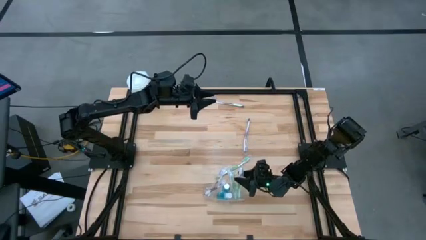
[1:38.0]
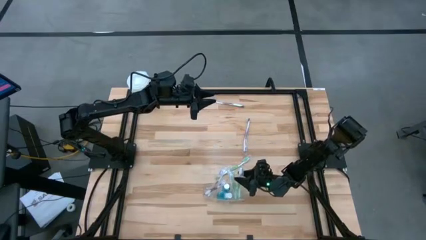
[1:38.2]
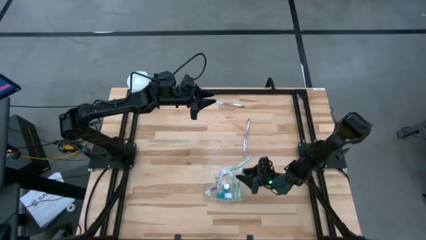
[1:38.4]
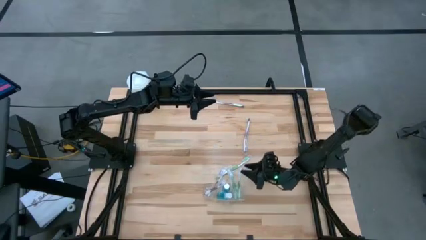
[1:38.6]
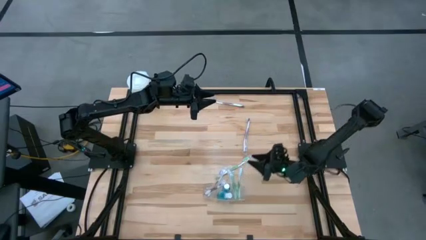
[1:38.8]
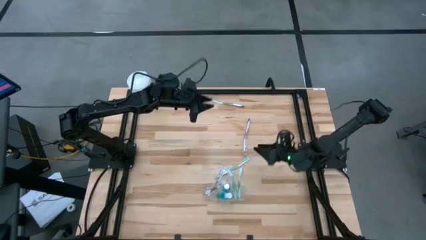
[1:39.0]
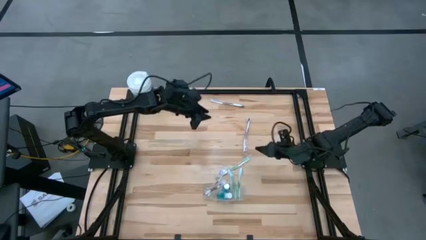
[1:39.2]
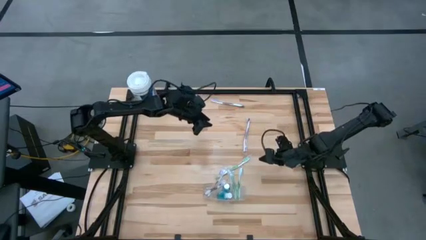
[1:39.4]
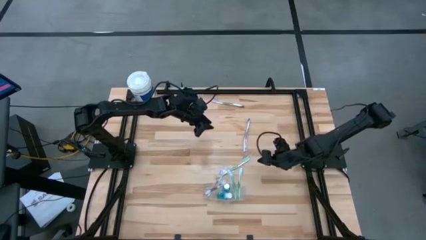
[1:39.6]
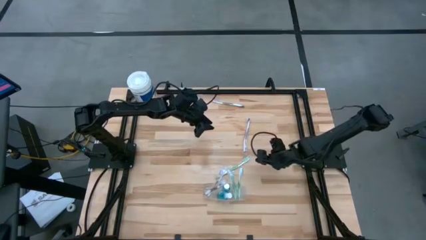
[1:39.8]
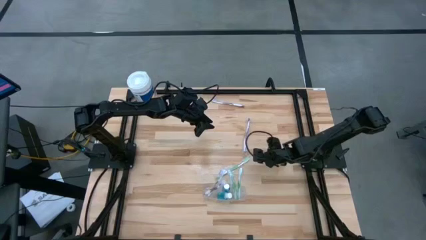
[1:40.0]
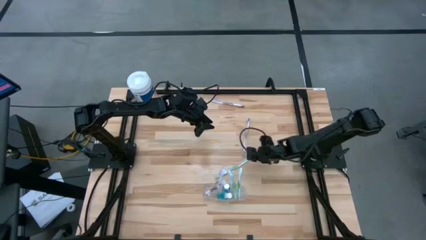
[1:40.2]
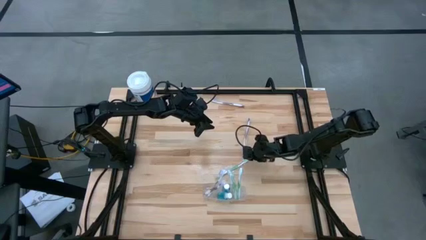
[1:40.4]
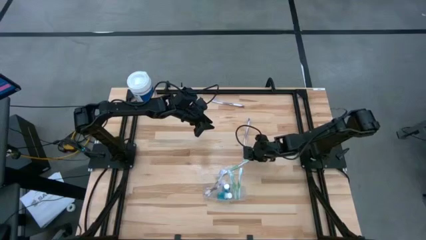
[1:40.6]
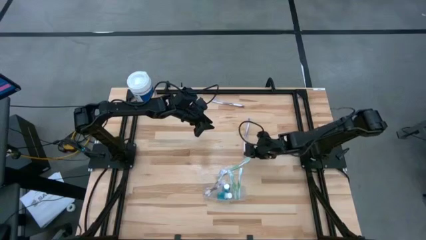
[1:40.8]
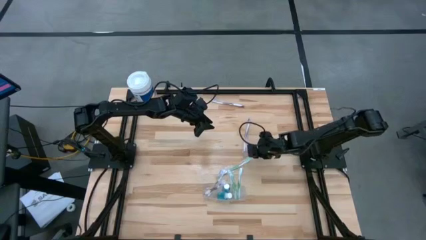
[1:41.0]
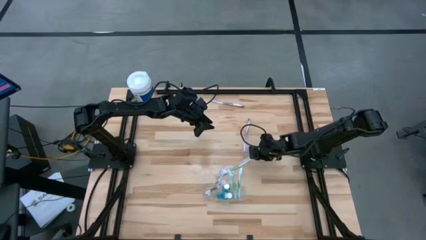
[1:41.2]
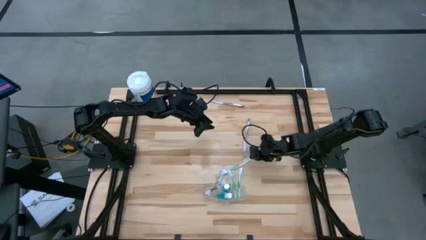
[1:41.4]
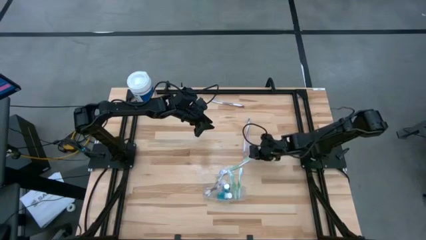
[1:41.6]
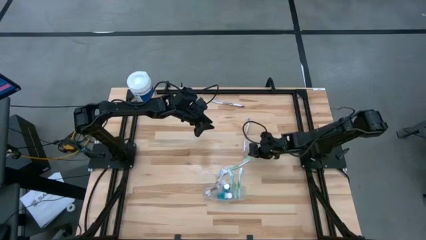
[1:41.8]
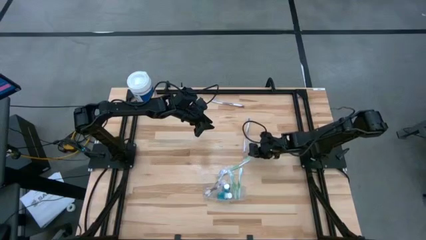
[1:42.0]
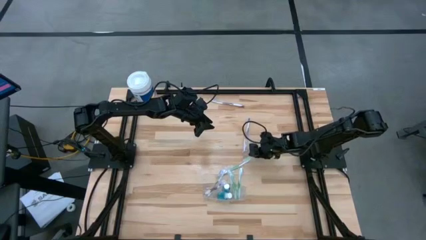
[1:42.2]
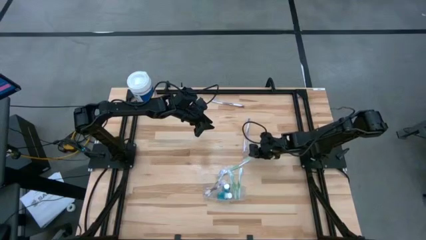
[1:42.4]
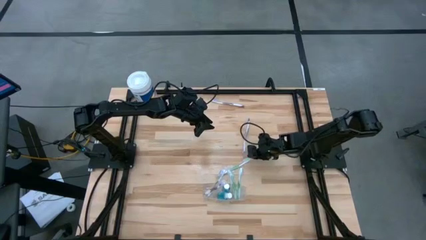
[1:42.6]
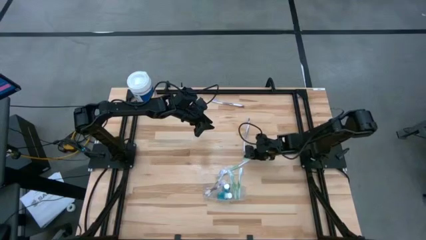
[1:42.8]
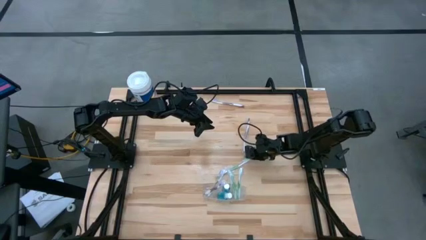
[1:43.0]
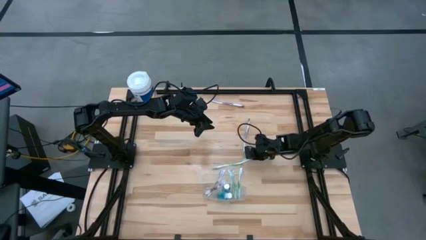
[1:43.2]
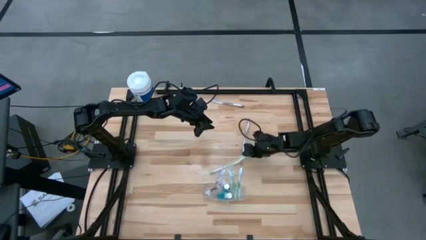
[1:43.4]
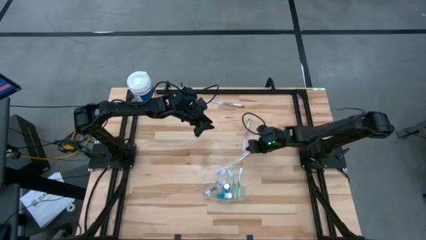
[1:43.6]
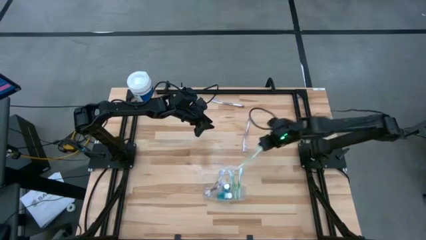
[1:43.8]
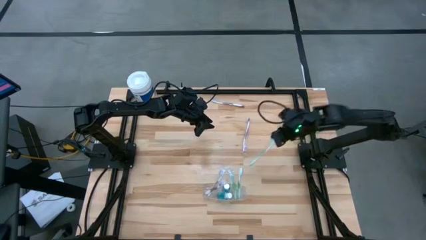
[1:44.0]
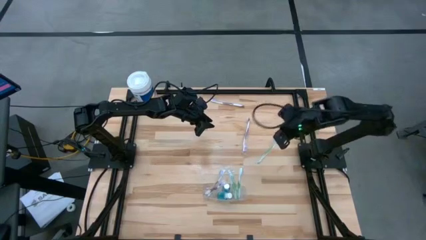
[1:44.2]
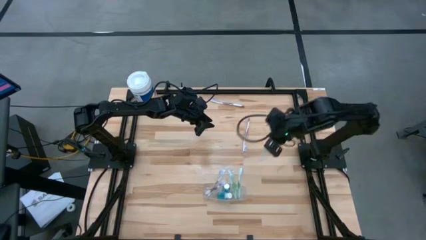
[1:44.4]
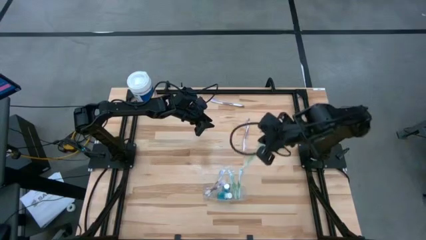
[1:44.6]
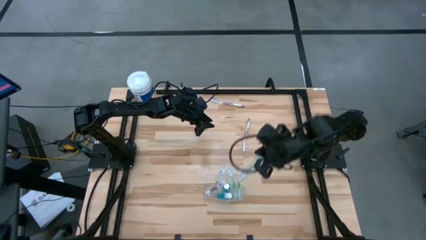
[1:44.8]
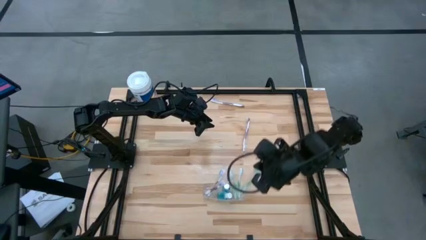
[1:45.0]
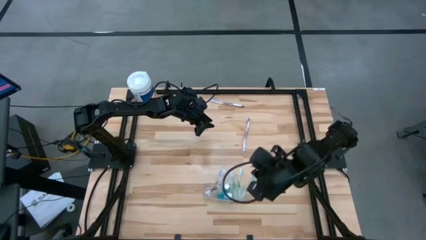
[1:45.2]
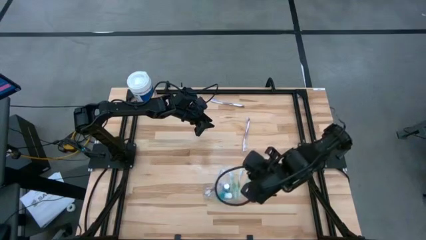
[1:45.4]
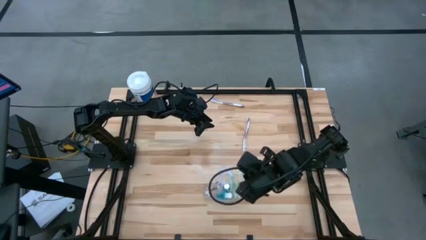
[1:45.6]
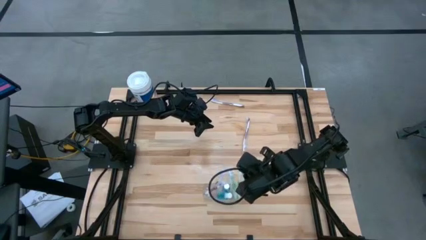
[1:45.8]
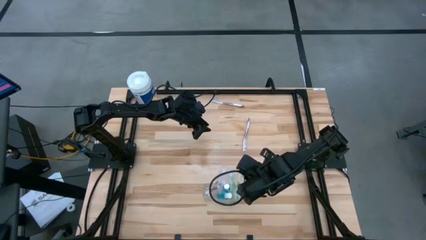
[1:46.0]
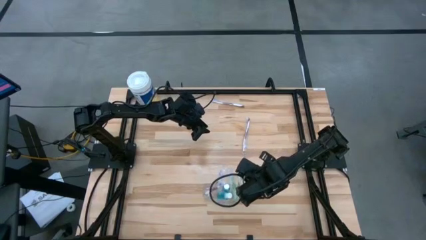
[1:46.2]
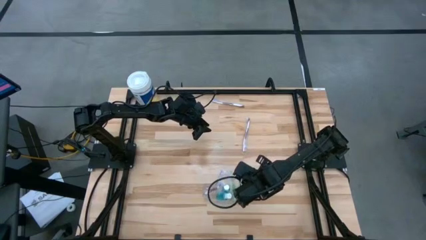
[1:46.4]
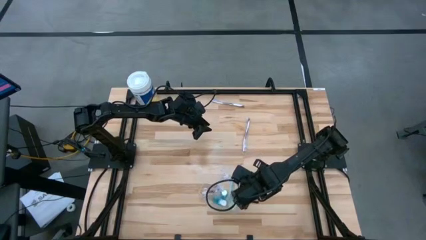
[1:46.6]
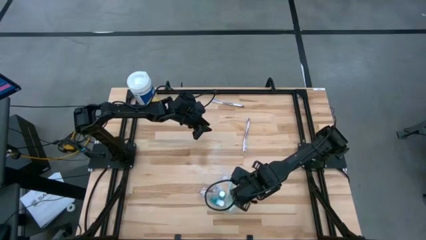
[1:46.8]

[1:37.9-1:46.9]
Task: Pick & Place toothbrushing station
Put the green toothbrush in the transparent organizer

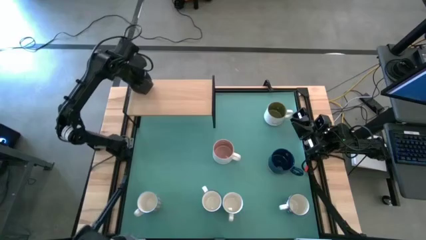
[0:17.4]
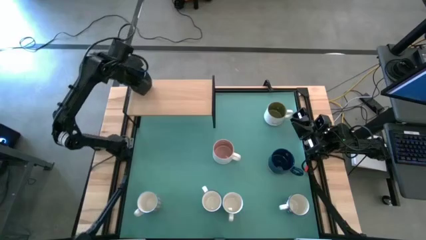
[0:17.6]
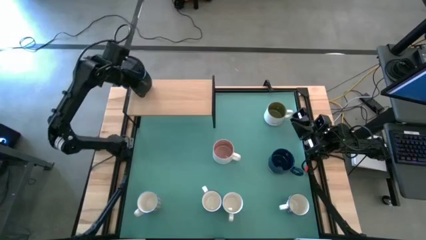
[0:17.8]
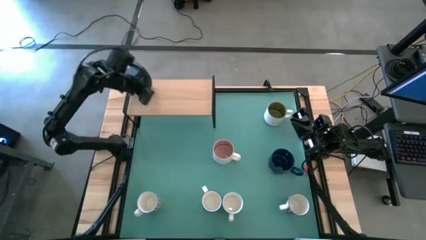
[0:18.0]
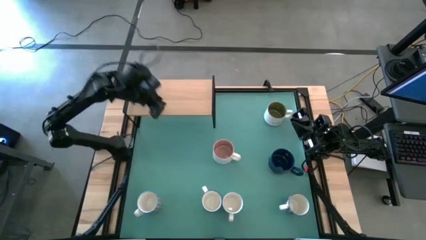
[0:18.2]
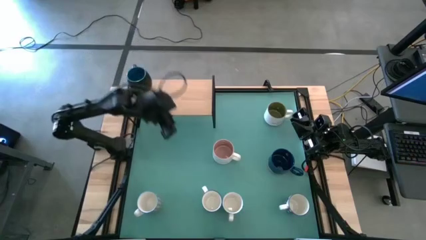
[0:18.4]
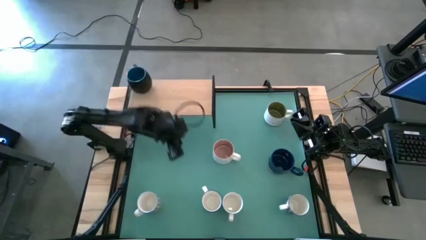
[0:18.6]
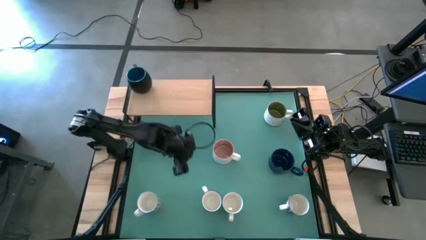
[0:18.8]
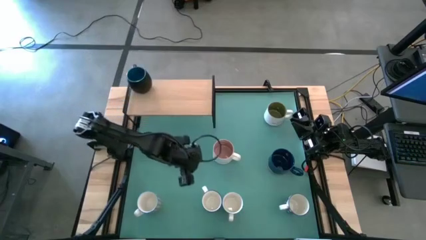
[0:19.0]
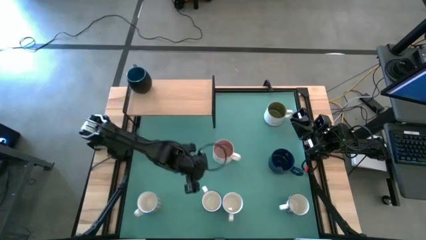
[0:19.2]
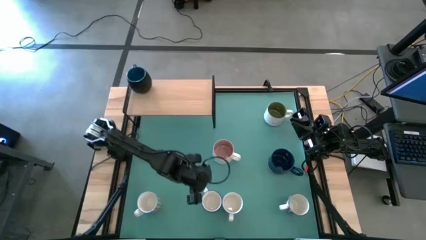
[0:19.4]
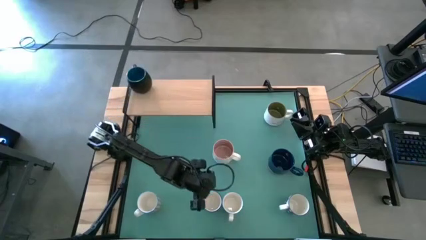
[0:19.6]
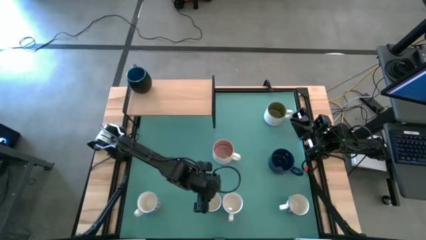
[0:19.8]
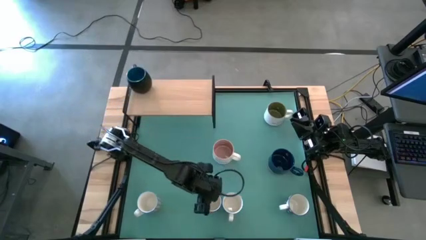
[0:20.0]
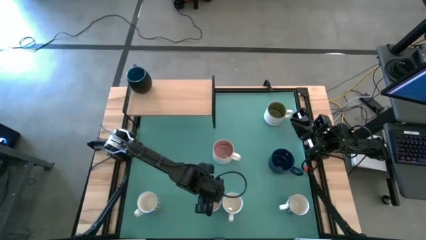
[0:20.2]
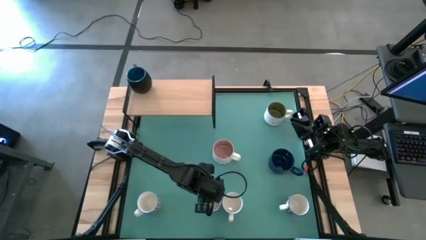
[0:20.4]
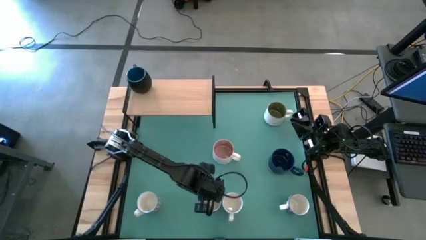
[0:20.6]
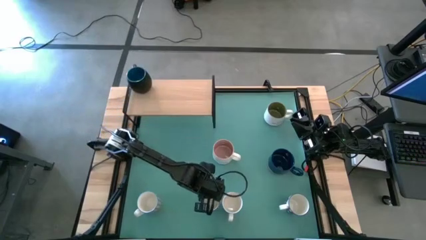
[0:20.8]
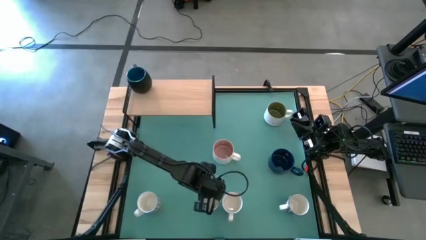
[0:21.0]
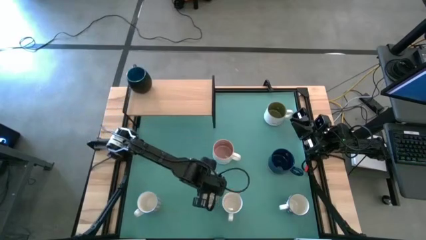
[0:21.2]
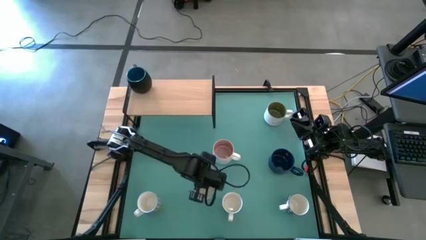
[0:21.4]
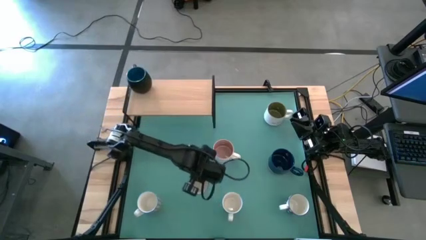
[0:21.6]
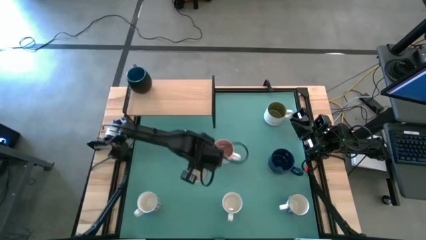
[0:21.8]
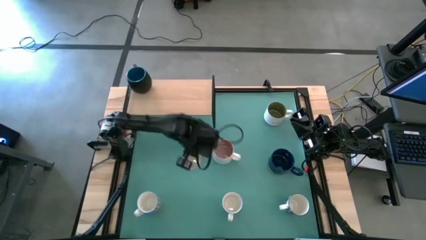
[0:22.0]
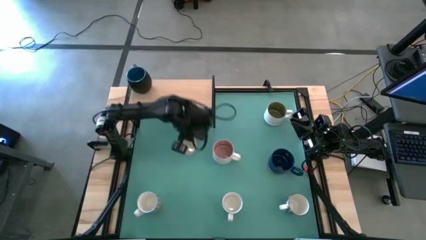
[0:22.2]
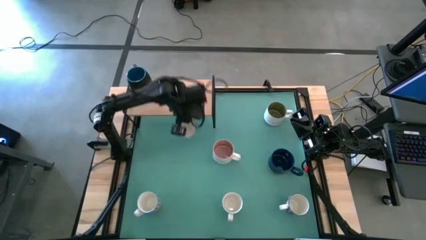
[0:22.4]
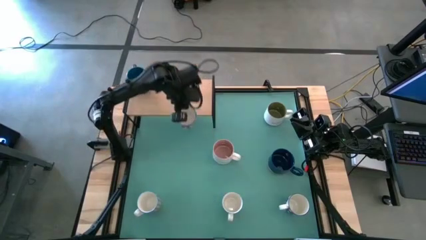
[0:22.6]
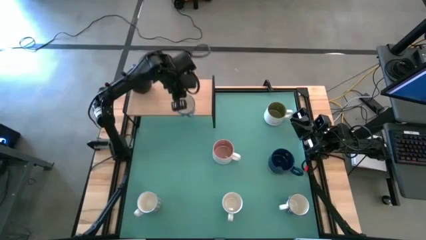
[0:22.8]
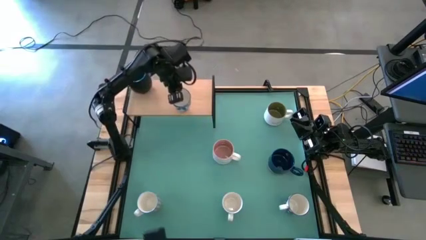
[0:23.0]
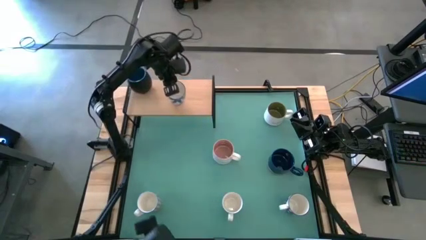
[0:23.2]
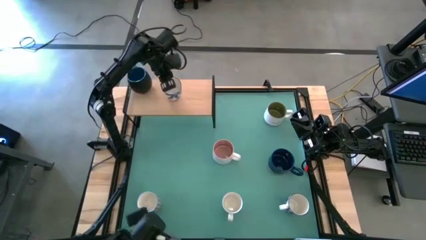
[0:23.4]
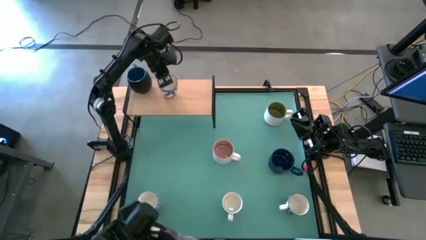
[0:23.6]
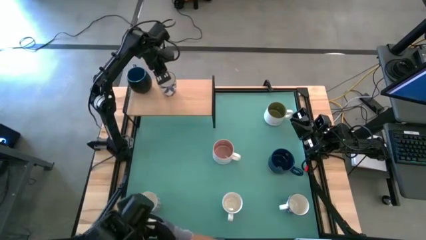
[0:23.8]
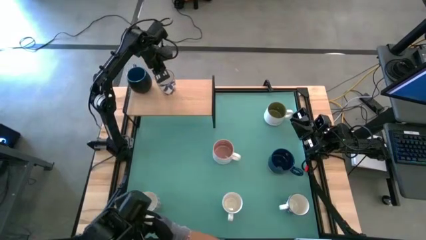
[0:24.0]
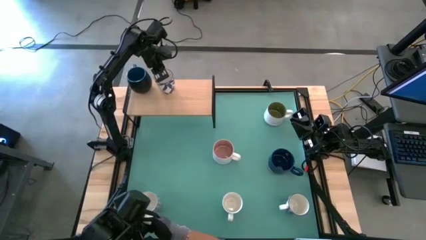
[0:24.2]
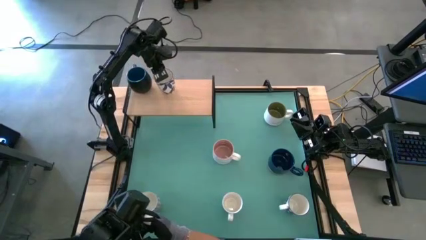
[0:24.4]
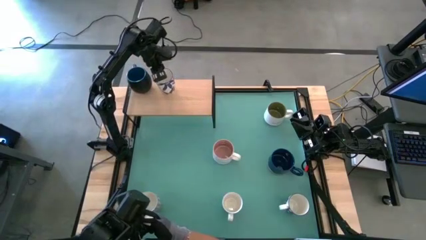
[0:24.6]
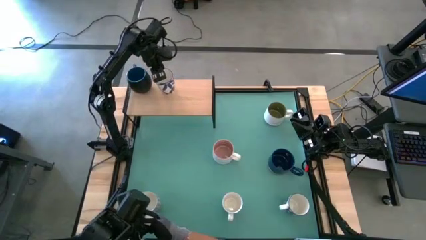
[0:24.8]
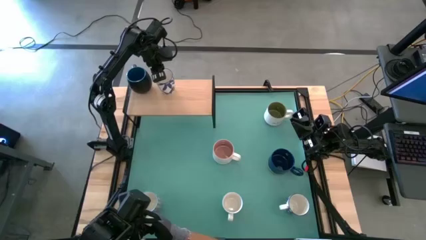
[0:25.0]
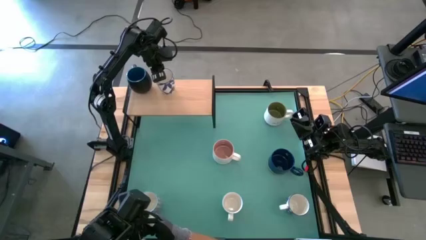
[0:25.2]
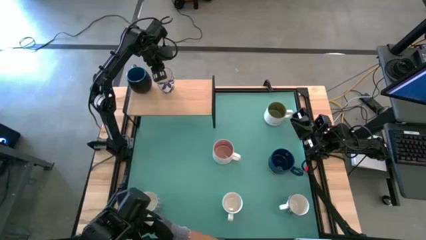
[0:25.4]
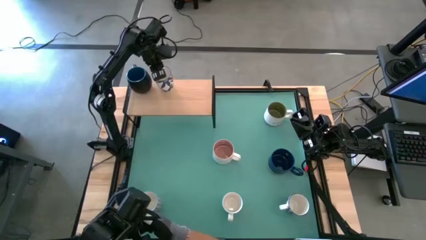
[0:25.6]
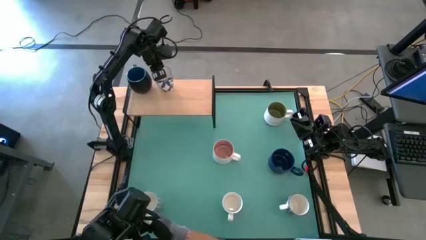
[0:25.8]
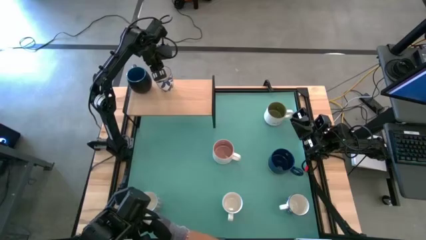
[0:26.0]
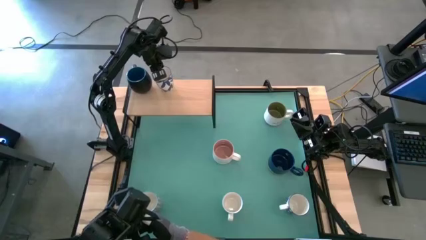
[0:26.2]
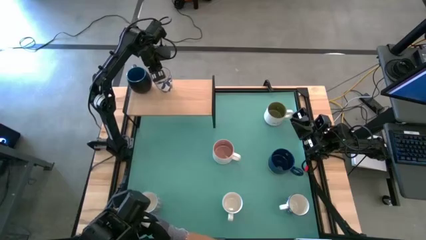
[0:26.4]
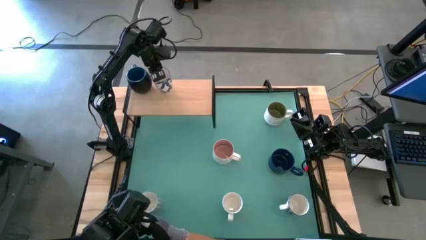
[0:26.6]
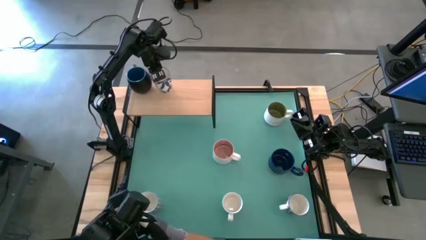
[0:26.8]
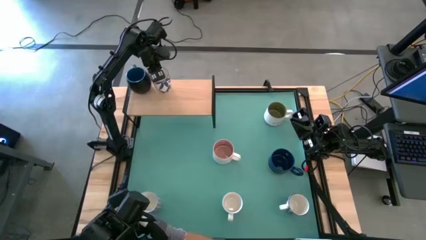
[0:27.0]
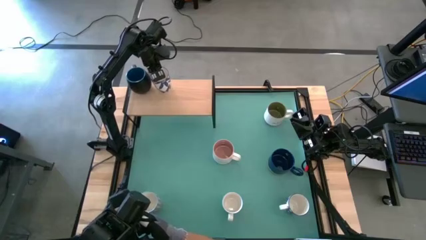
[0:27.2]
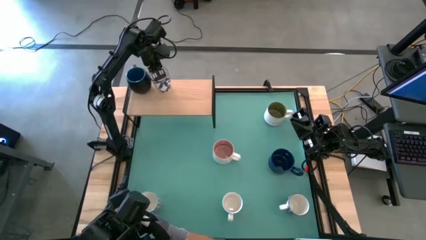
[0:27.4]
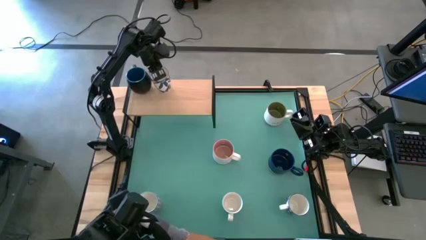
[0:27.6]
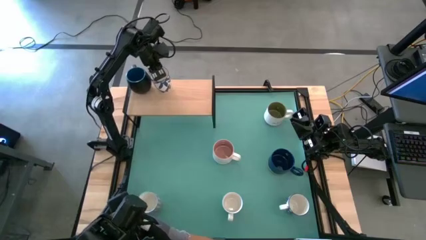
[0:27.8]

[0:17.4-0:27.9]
Task: Place coffee mugs
Put the left white blue patterned mug on the shelf
